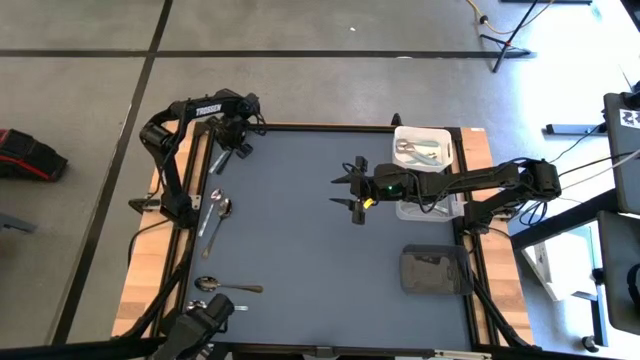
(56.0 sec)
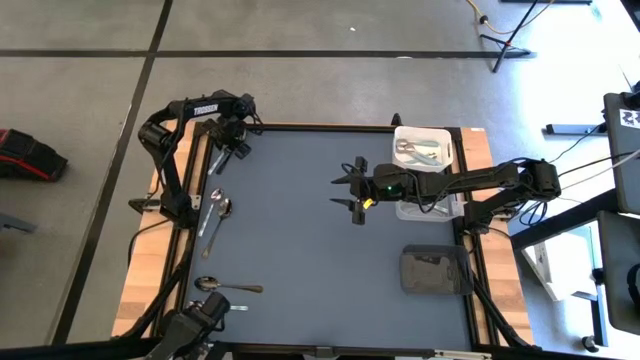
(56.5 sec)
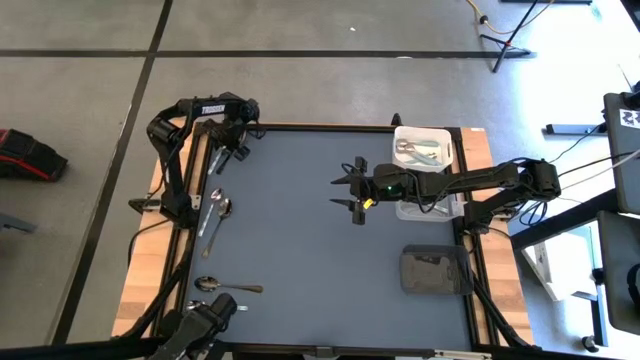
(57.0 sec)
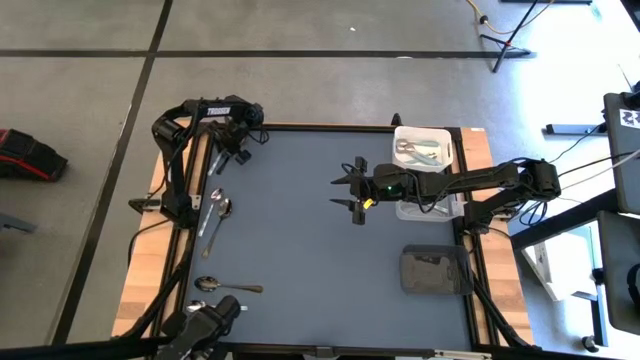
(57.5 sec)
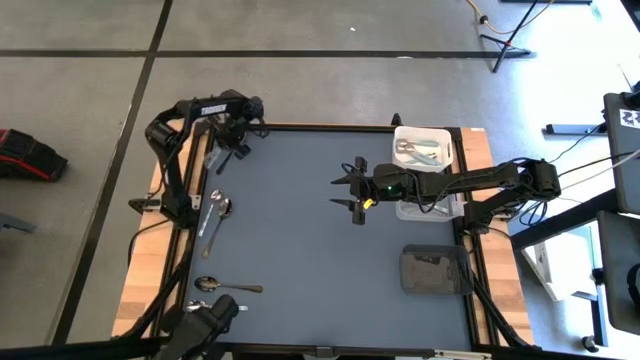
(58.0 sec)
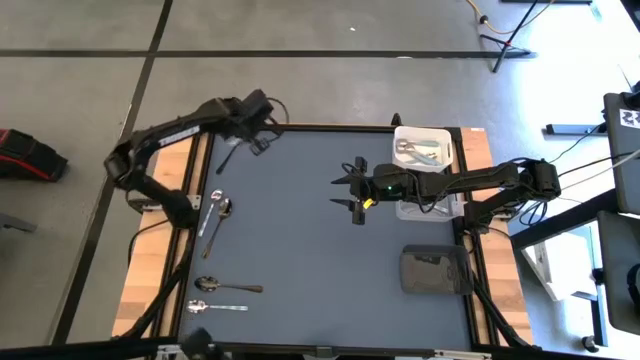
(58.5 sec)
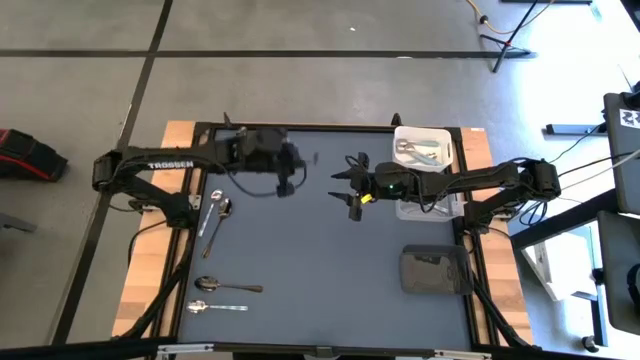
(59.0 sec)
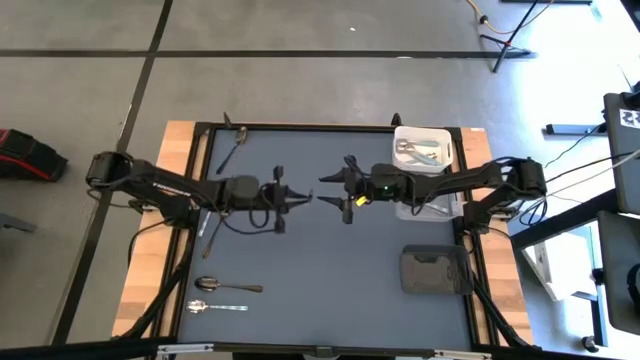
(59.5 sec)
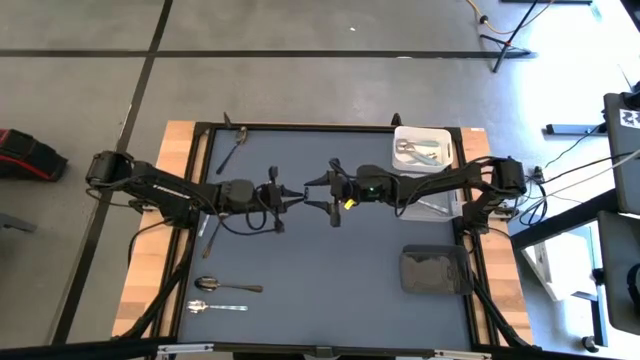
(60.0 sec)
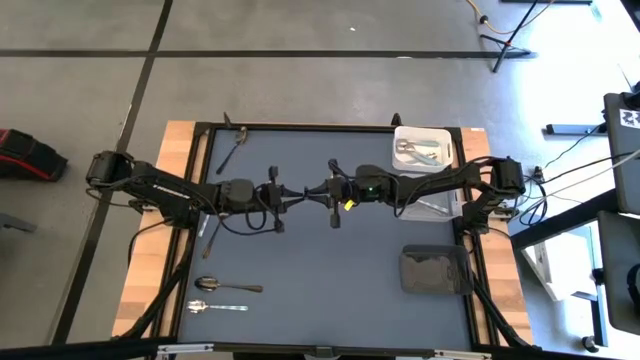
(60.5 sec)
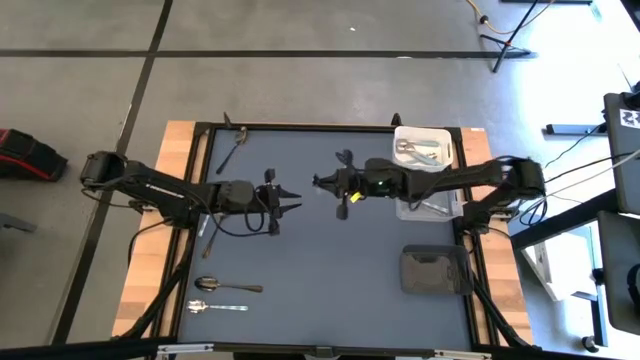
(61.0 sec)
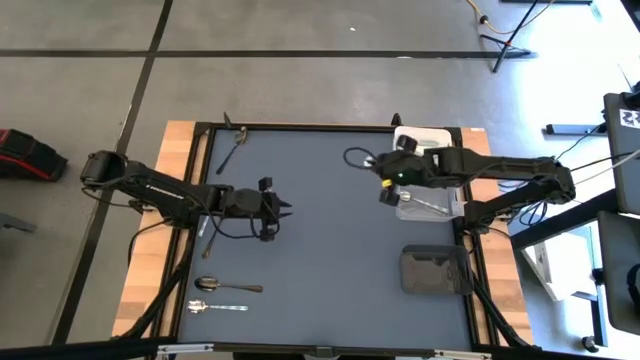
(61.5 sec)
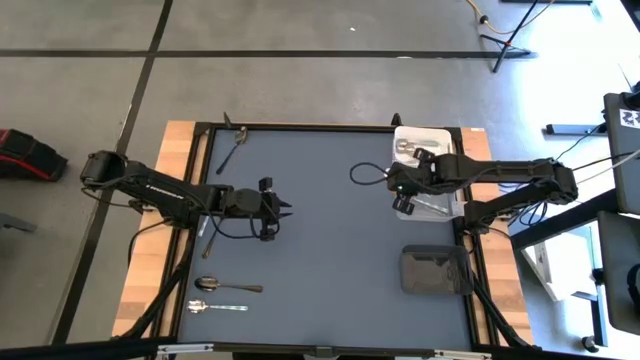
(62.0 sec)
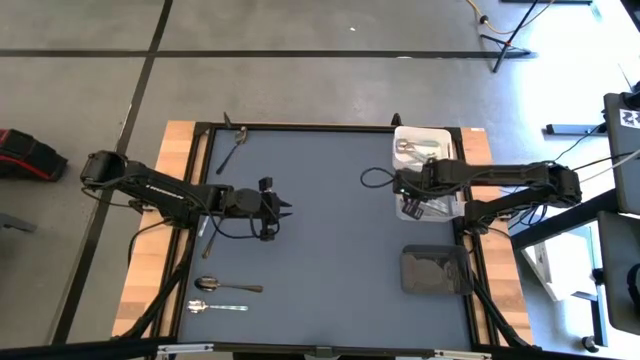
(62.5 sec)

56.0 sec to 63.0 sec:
Task: Sort silverware by color (type)
Put the white green spoon into the transparent bin

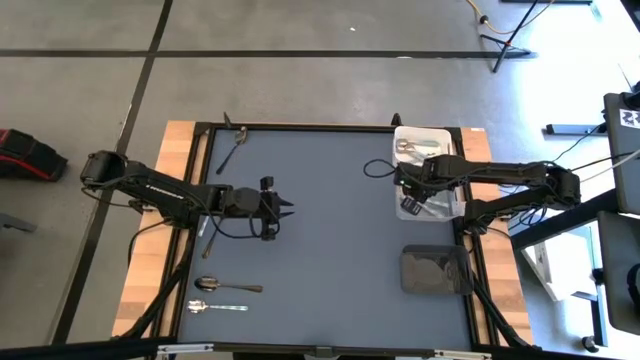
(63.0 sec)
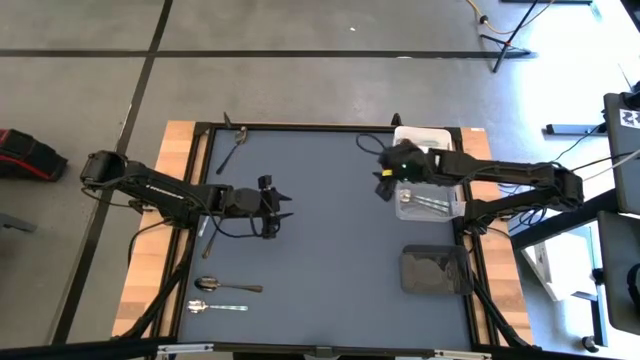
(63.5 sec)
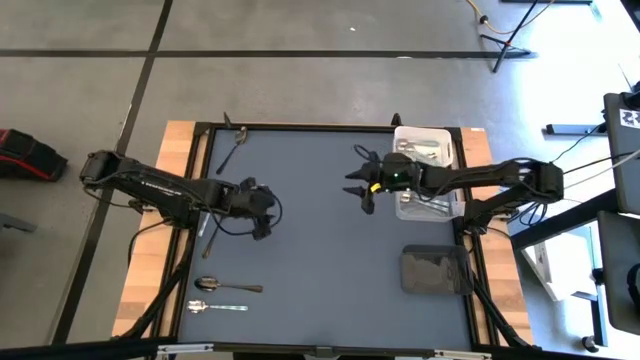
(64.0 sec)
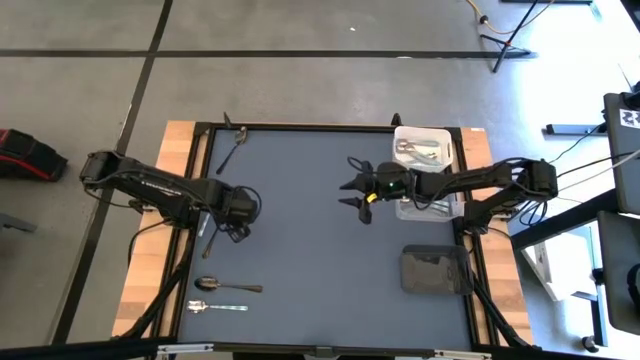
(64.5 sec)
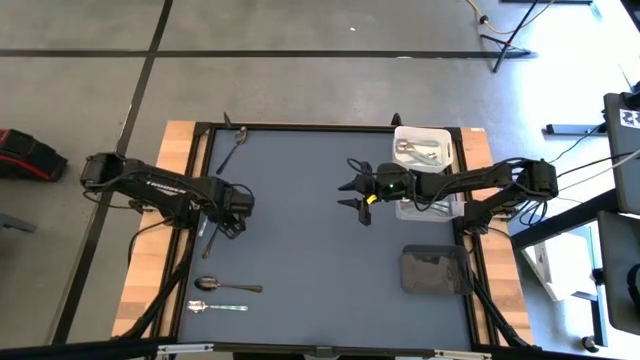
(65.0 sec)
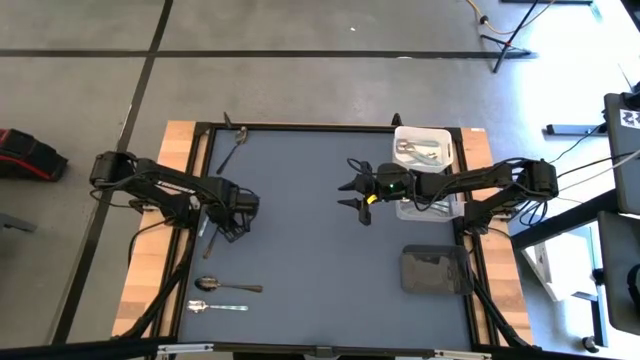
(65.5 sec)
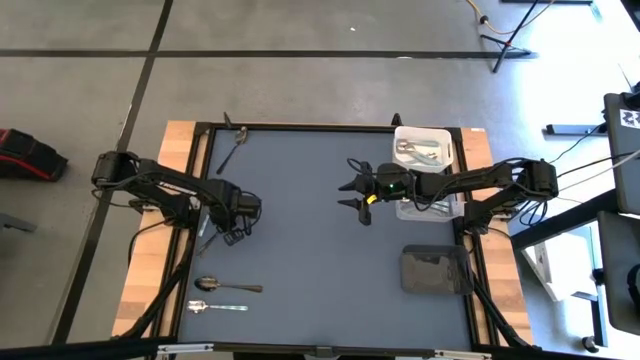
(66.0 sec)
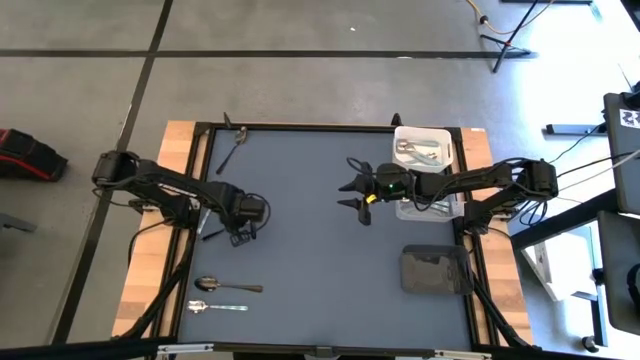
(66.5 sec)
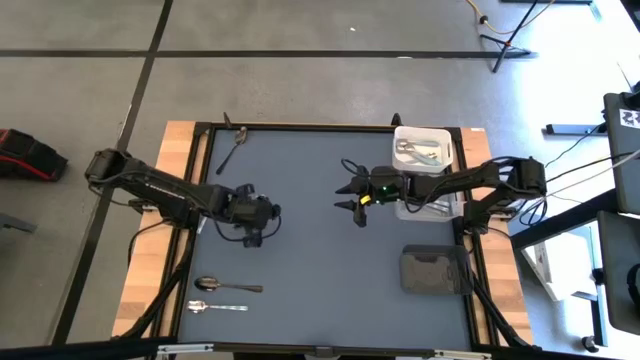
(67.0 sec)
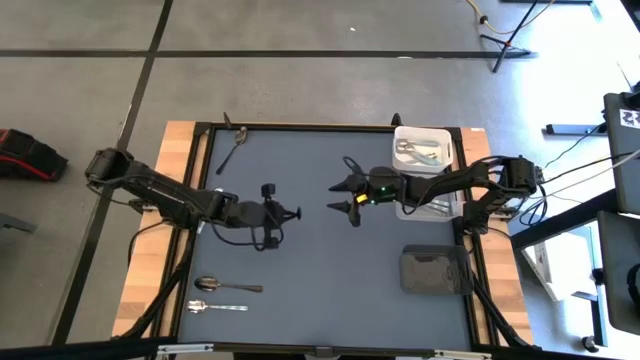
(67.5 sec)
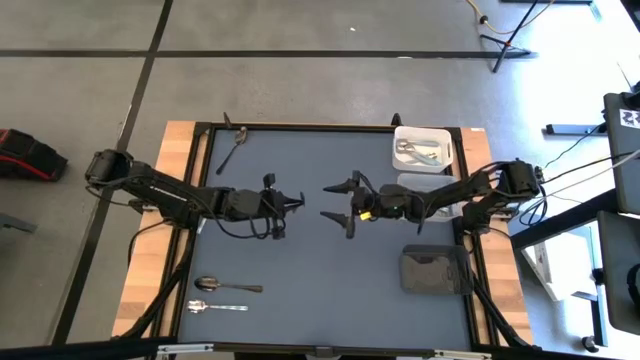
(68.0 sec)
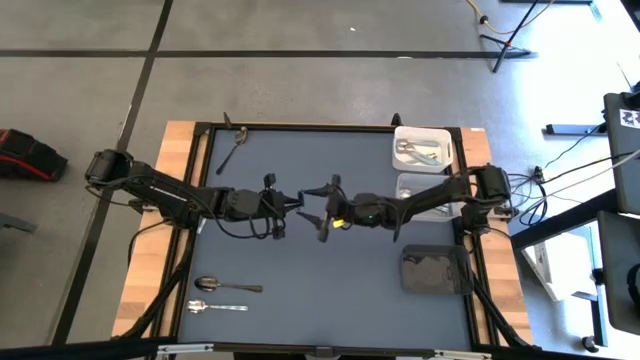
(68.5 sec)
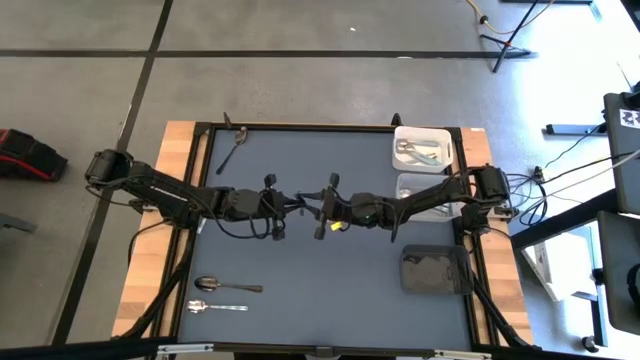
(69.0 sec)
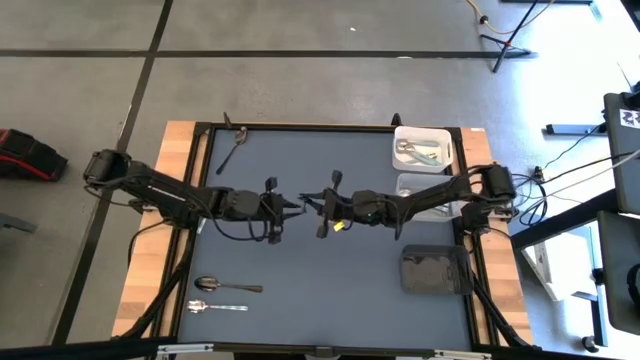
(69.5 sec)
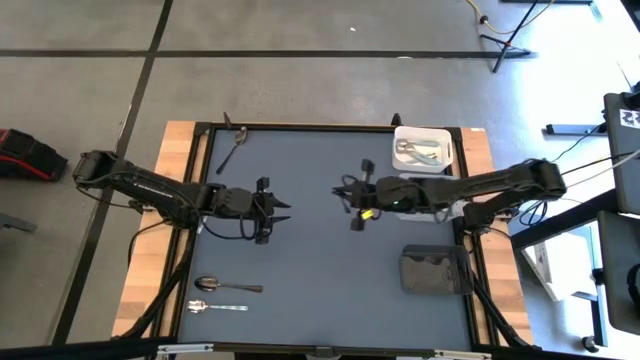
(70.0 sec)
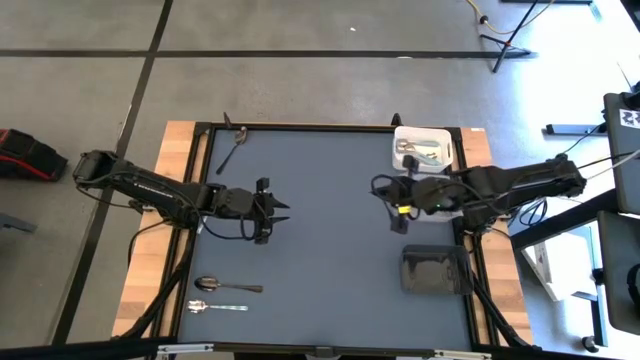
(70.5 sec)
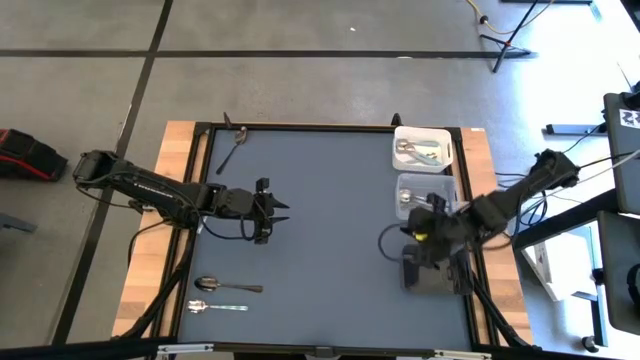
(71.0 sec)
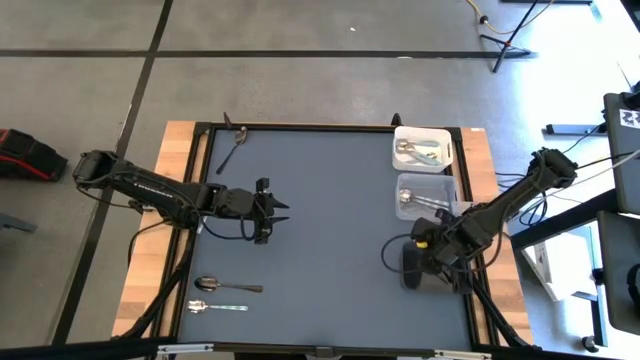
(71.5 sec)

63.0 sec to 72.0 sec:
Put the black spoon into the black bin

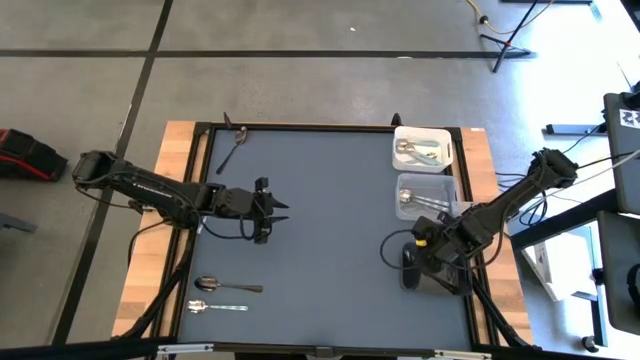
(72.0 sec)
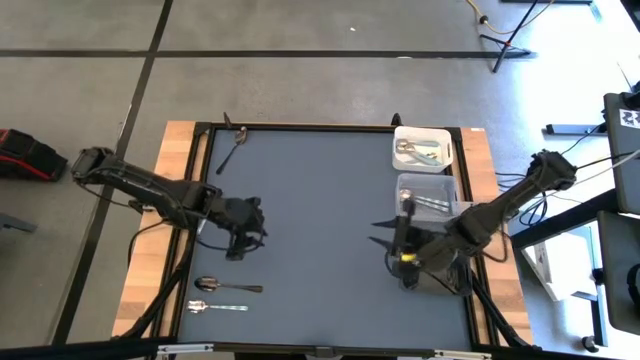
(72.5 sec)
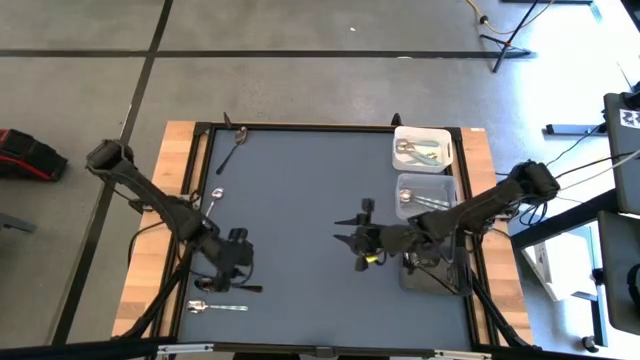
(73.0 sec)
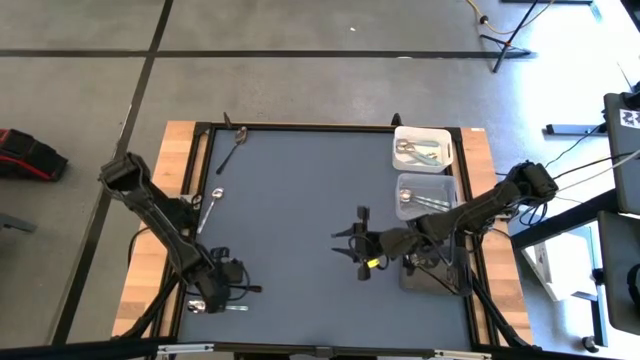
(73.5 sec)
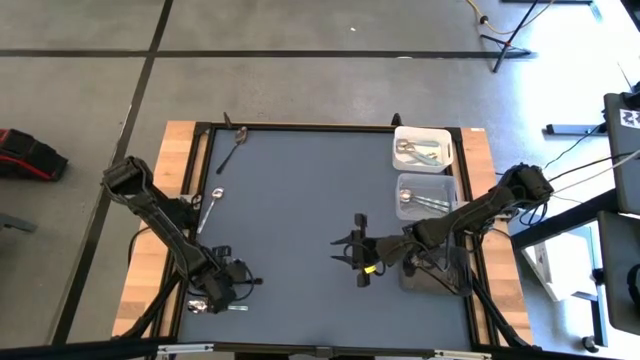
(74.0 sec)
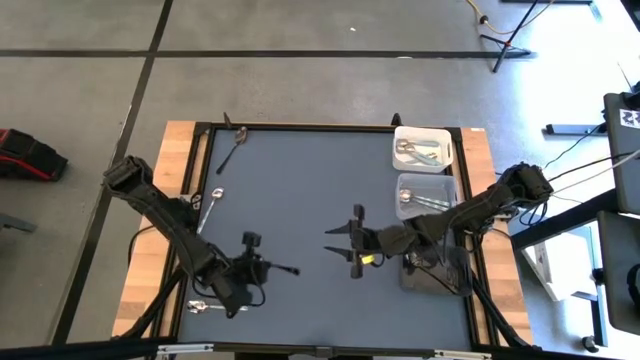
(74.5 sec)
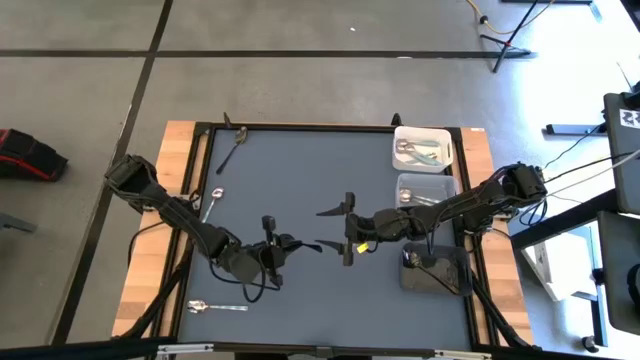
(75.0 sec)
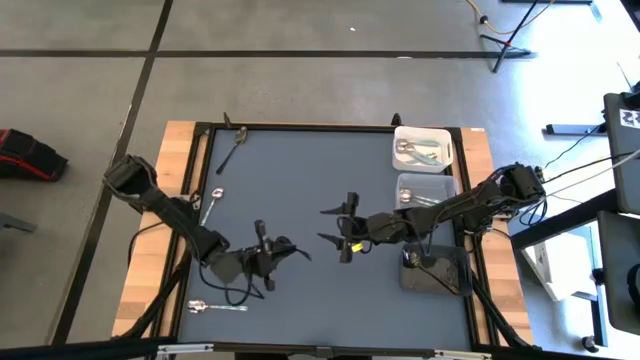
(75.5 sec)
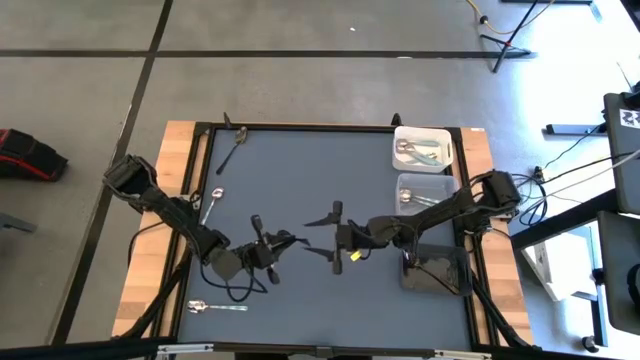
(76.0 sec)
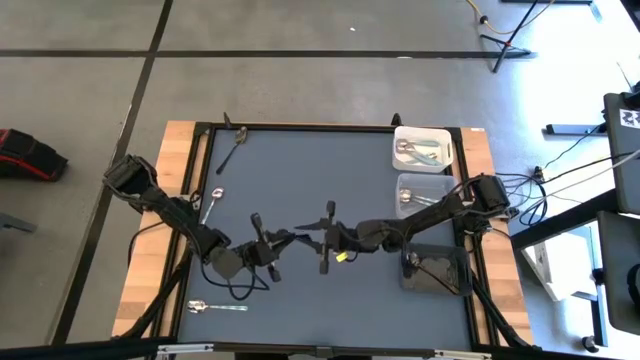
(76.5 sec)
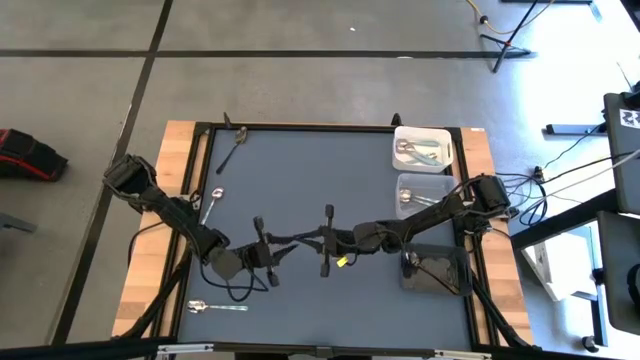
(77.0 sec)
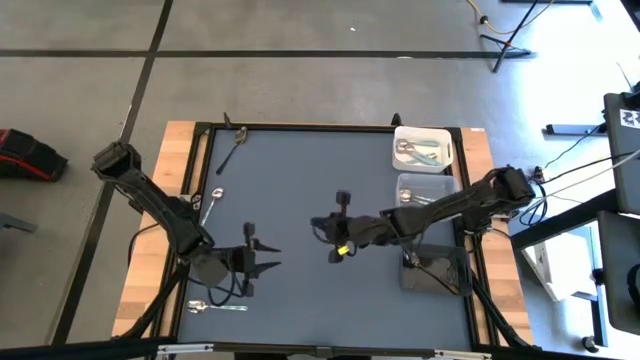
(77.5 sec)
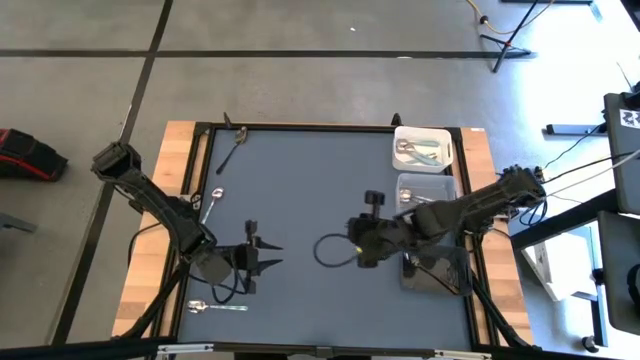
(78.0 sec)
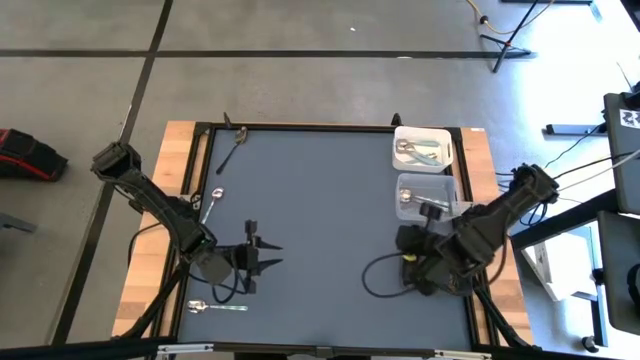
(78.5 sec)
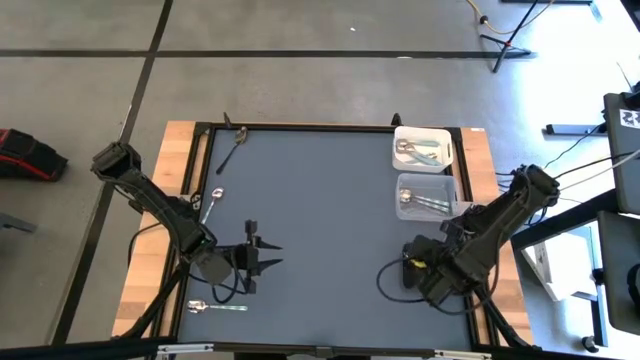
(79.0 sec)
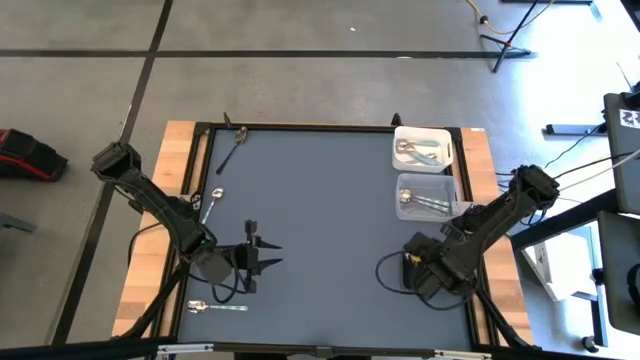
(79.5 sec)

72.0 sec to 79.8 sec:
Put the black spoon into the black bin
